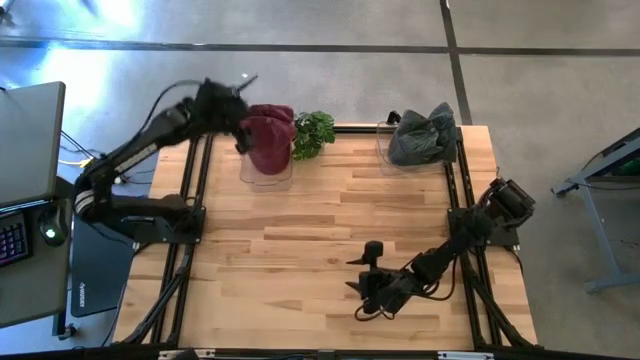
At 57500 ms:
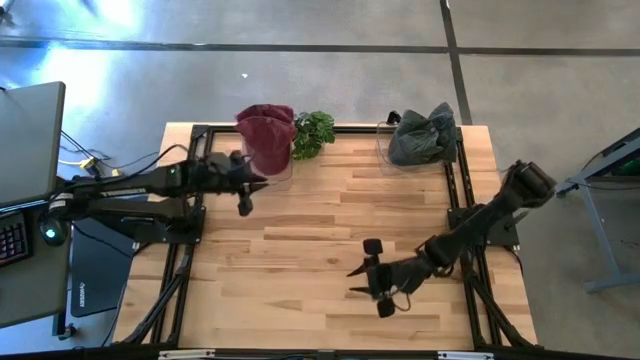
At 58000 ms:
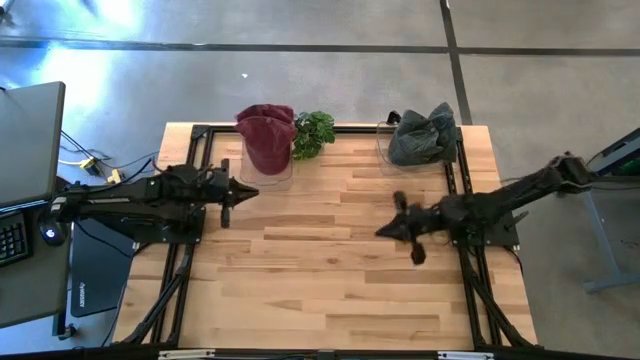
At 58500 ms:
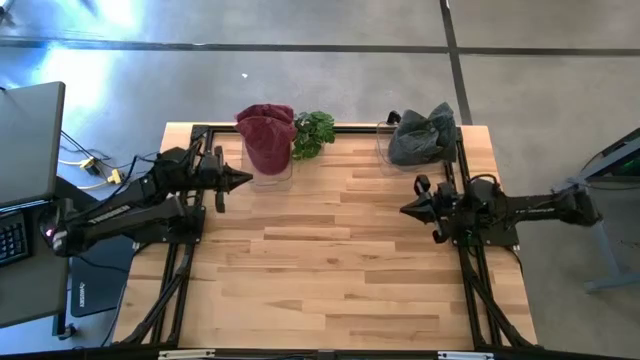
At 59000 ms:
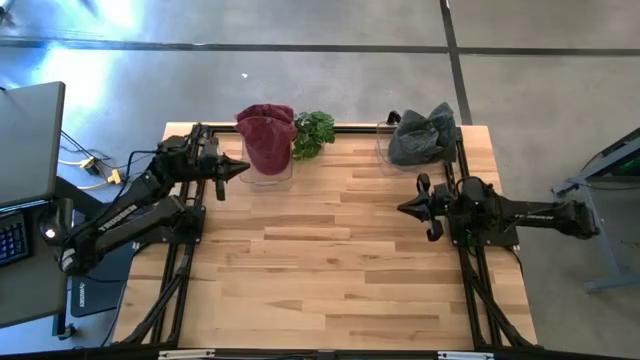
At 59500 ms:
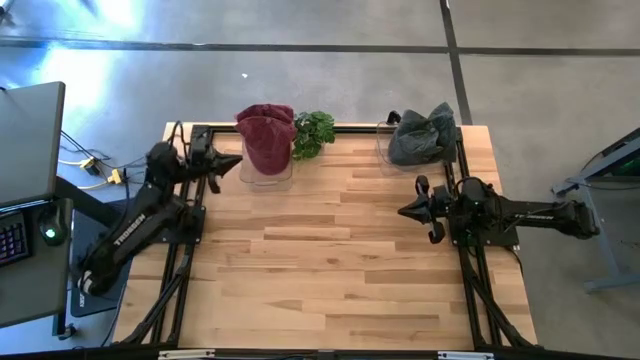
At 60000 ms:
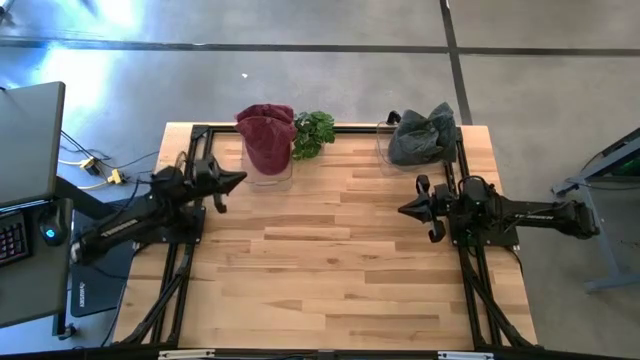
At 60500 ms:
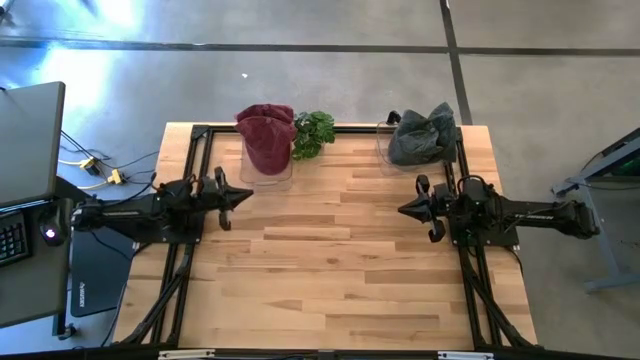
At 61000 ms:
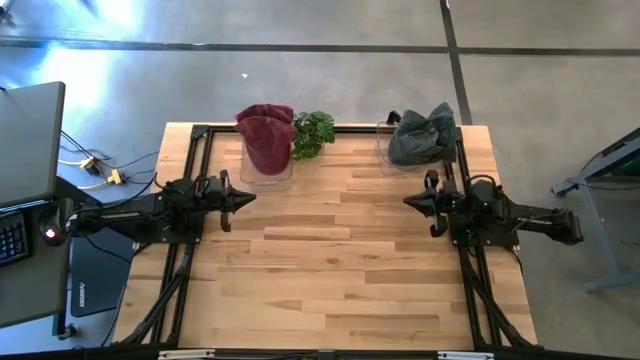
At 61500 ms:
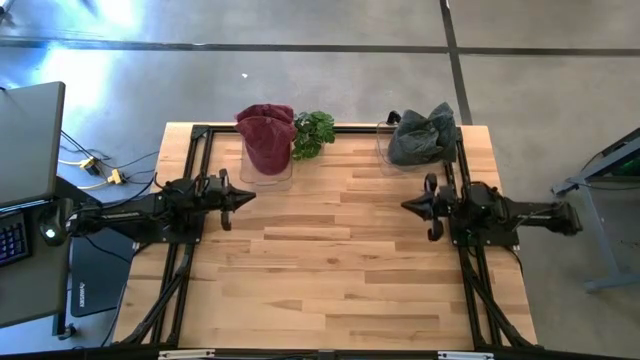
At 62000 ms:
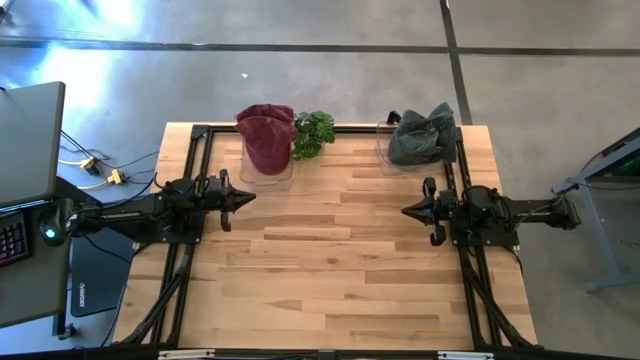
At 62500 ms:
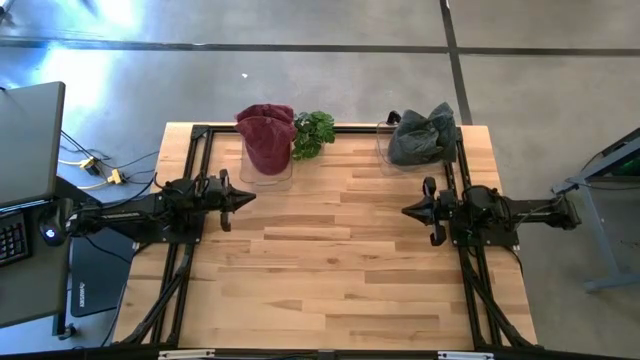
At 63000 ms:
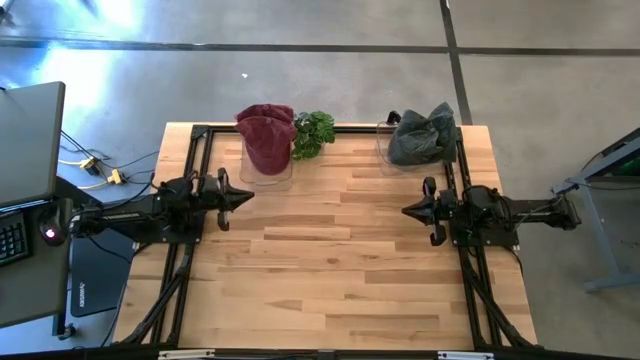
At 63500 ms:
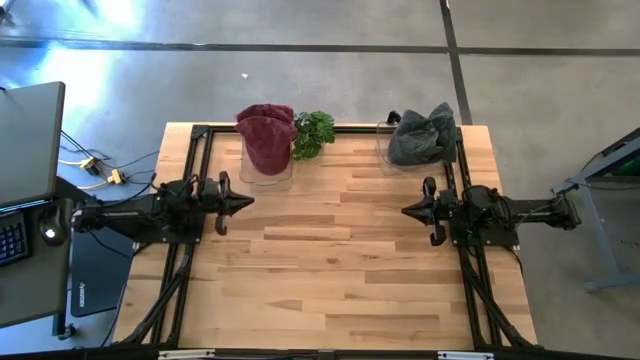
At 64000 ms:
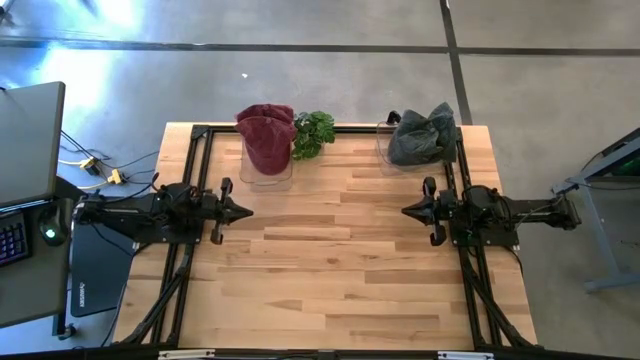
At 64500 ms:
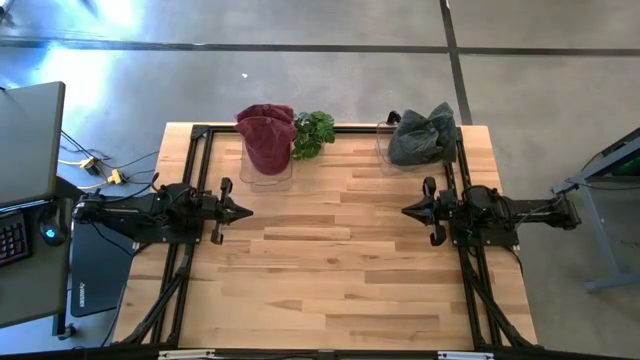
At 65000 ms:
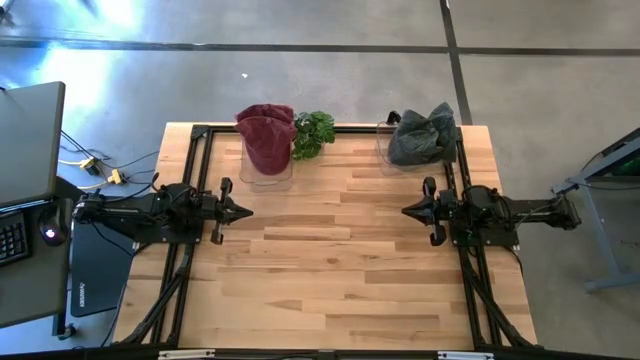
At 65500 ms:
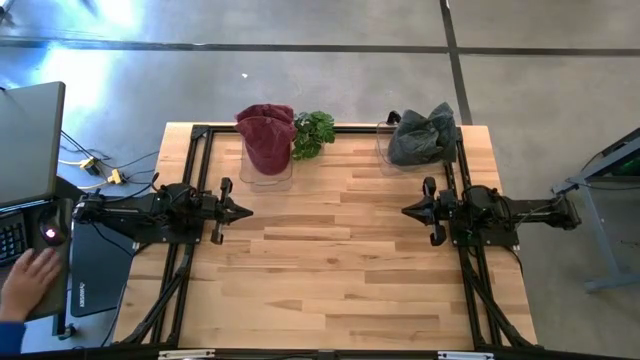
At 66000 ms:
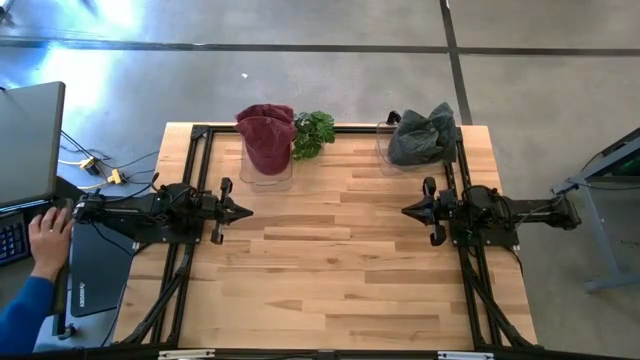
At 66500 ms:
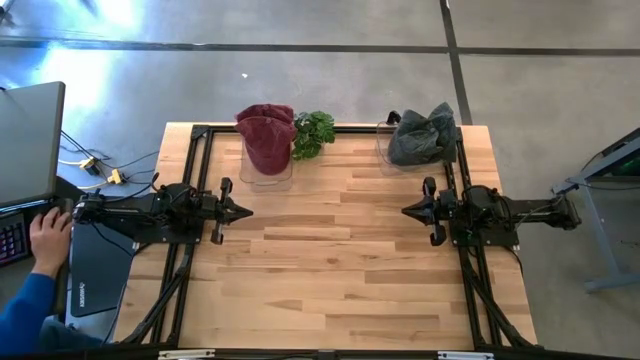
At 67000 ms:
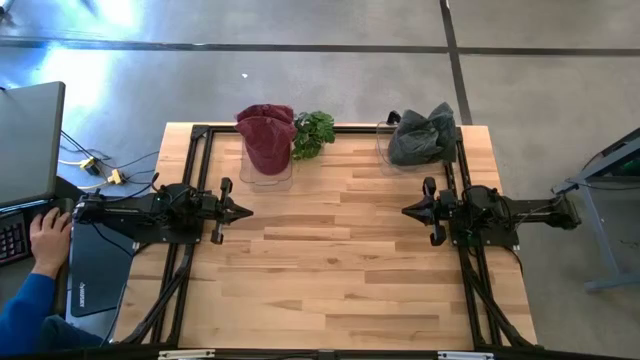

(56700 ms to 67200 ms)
Task: Pick & Place hat
Return to Home Position

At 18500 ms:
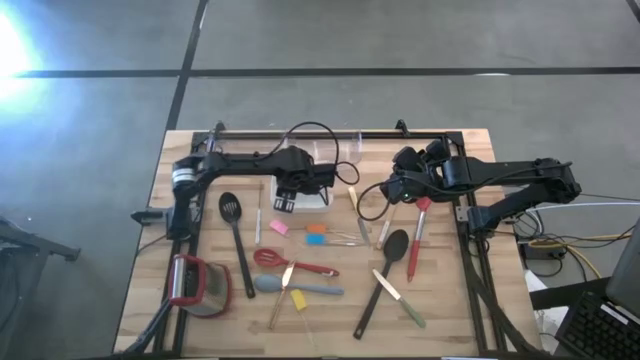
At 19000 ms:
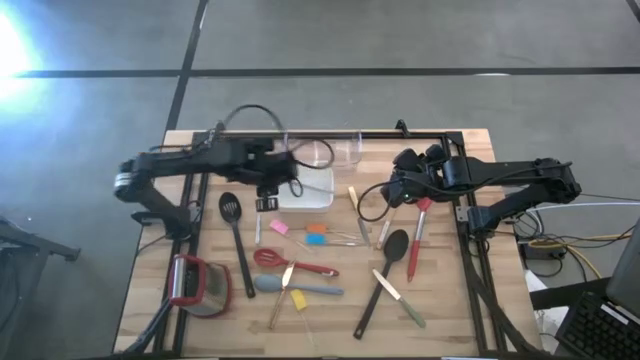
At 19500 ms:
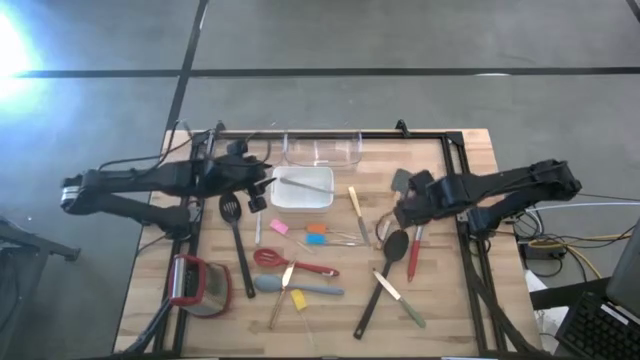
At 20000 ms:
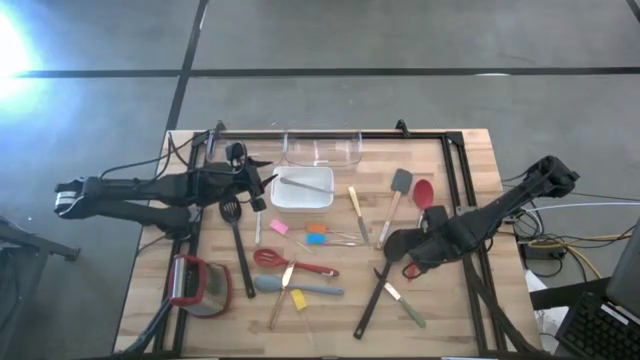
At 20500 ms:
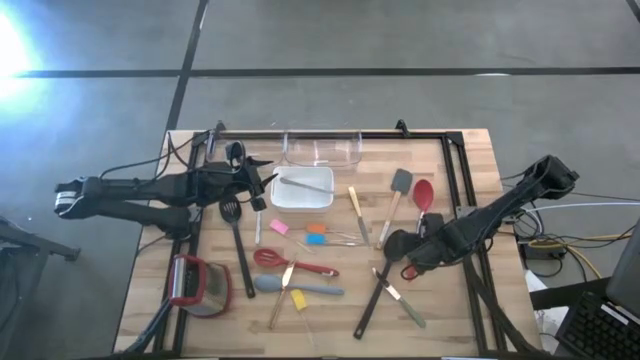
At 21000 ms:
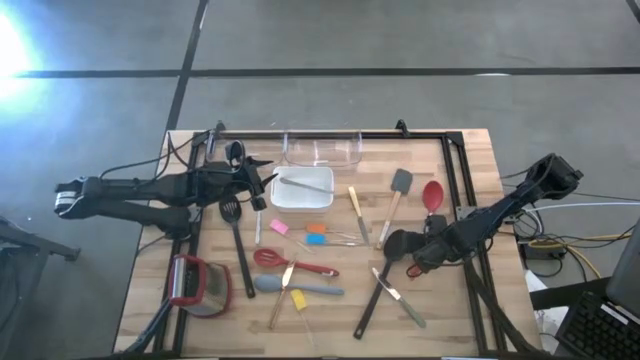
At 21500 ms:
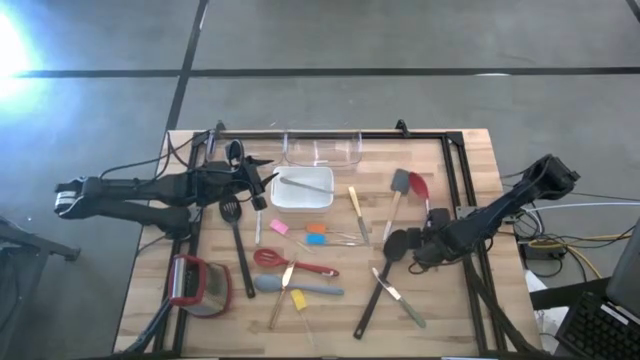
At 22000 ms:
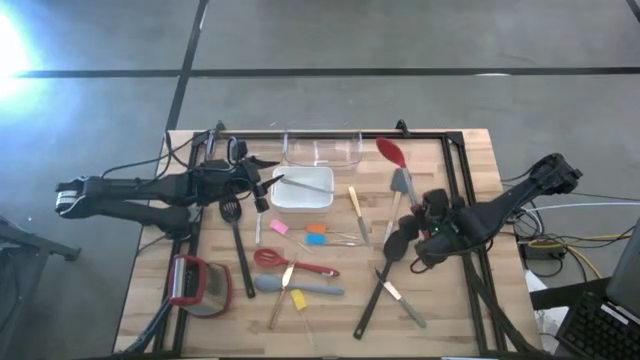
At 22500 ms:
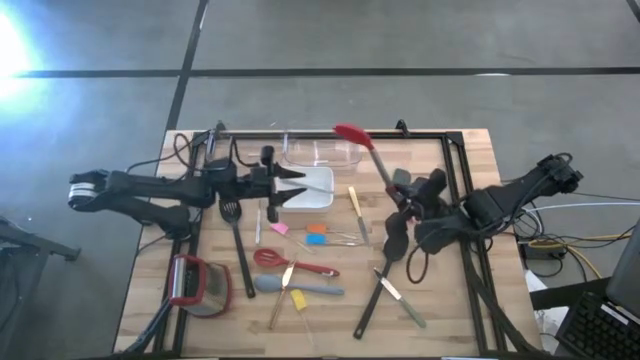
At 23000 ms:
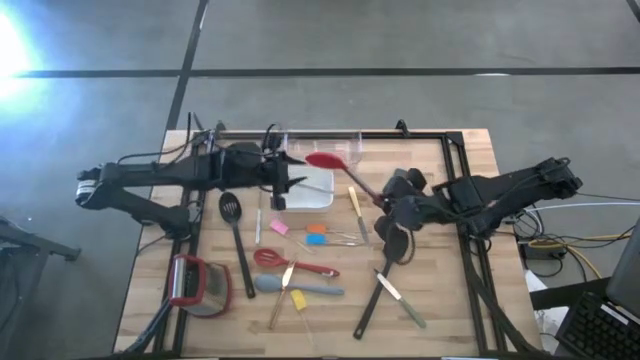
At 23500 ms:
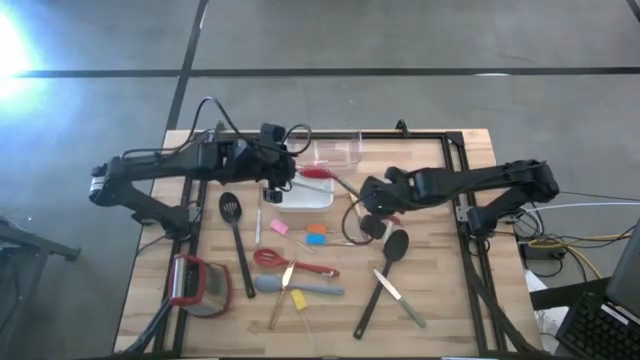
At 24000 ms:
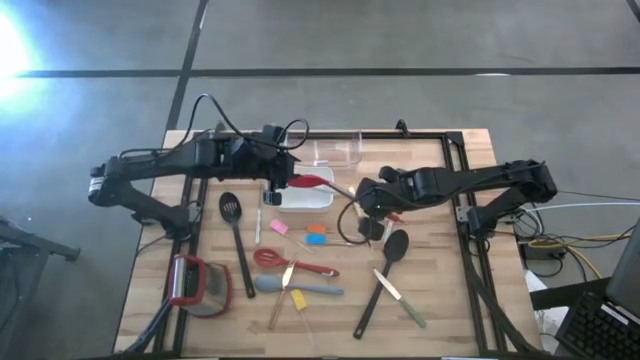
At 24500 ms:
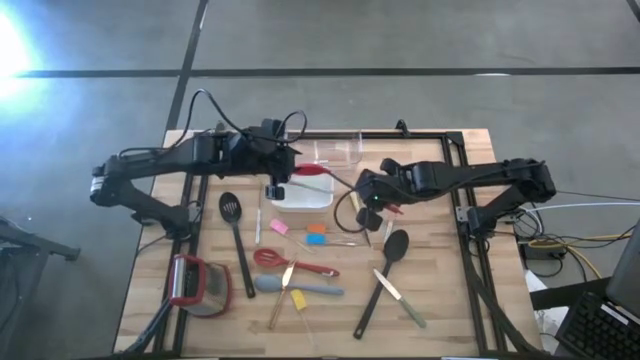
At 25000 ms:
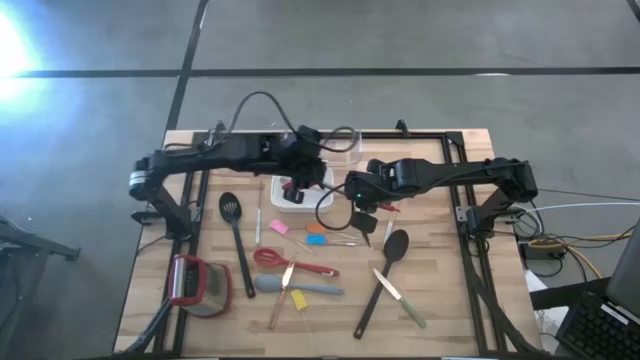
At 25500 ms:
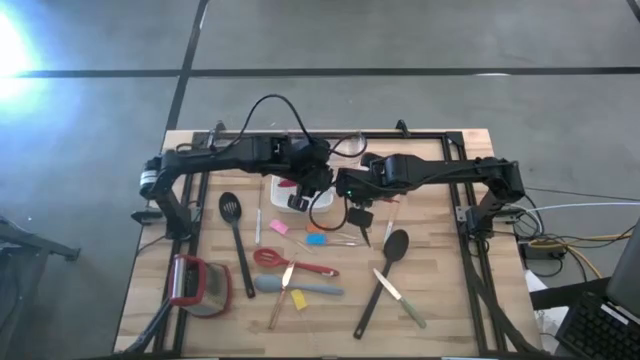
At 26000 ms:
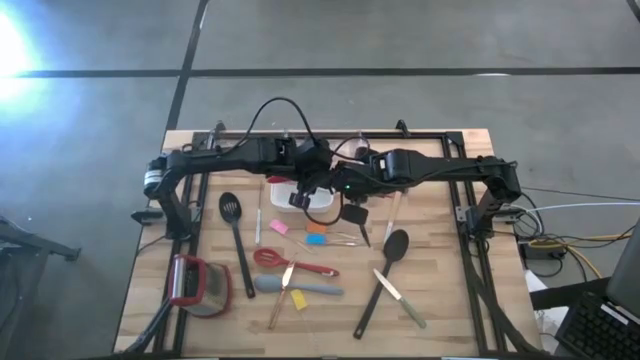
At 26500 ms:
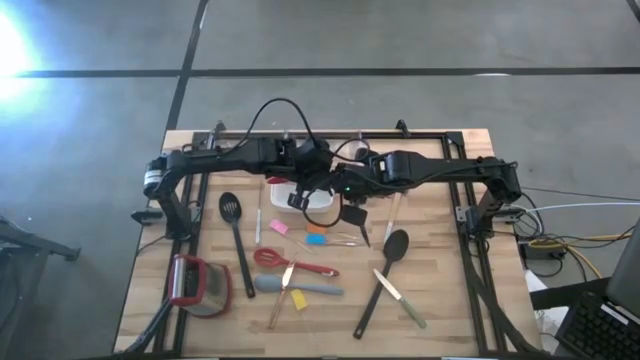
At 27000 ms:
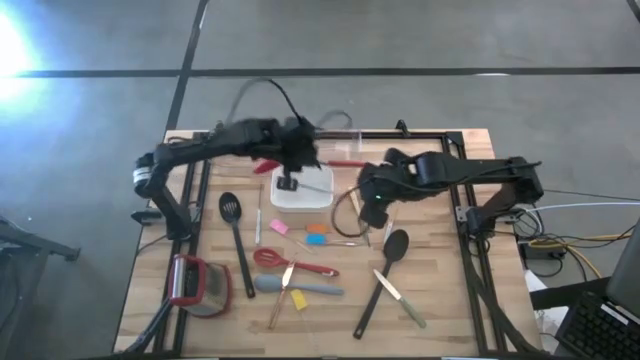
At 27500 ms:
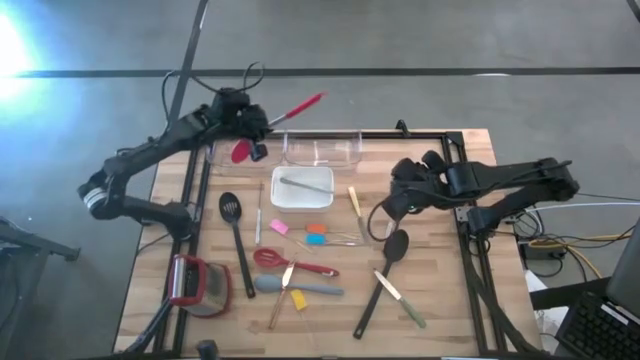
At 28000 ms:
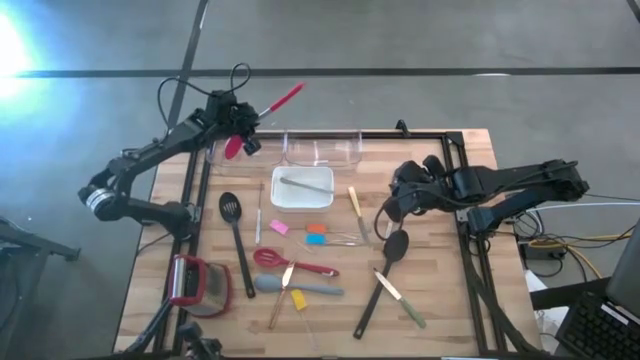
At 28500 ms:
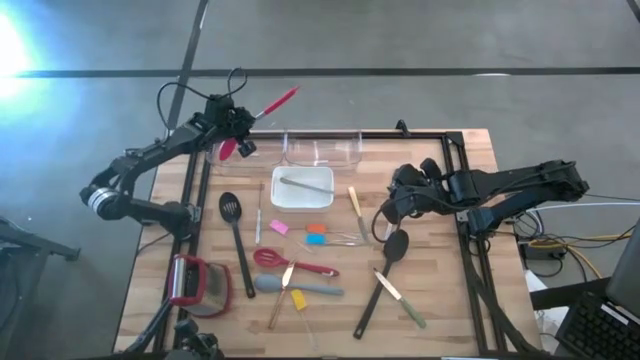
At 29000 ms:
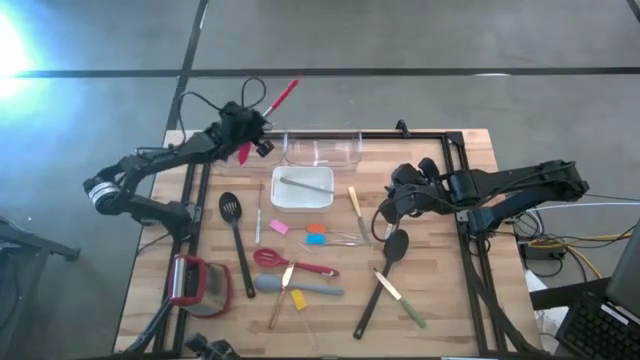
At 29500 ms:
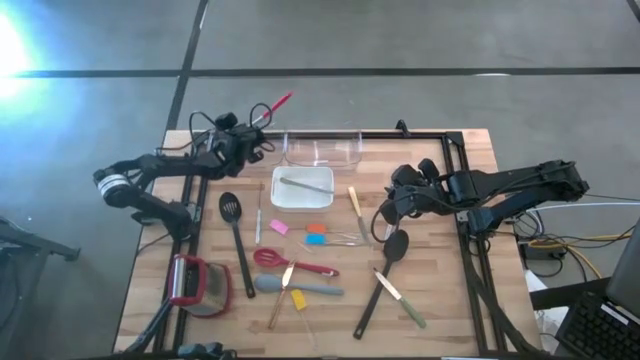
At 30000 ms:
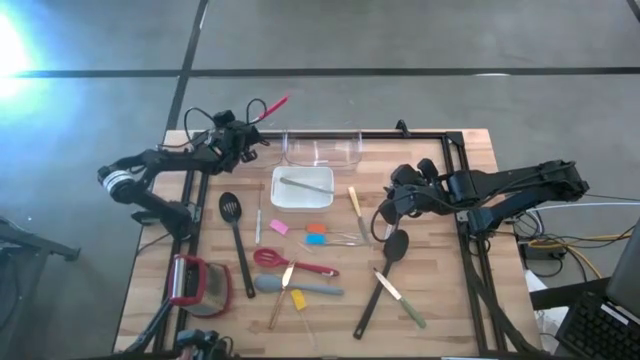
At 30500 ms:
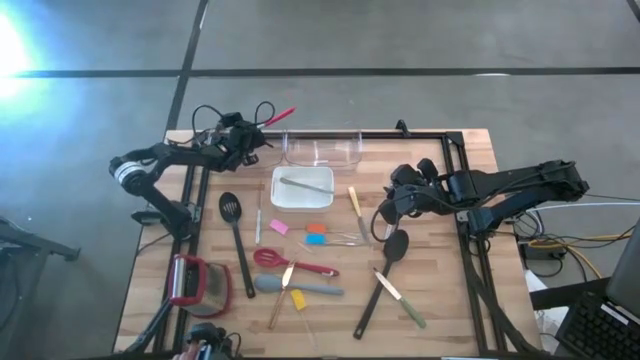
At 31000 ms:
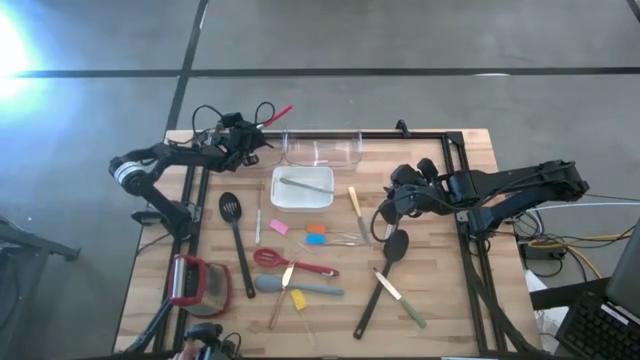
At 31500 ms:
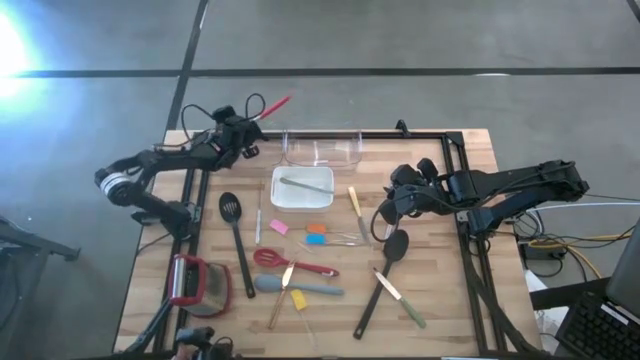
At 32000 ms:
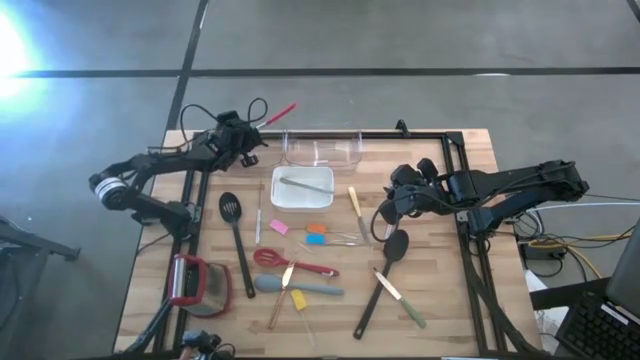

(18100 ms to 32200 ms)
Task: Pick & Place Kitchen Items
Put the red serving spoon into the left transparent bin
